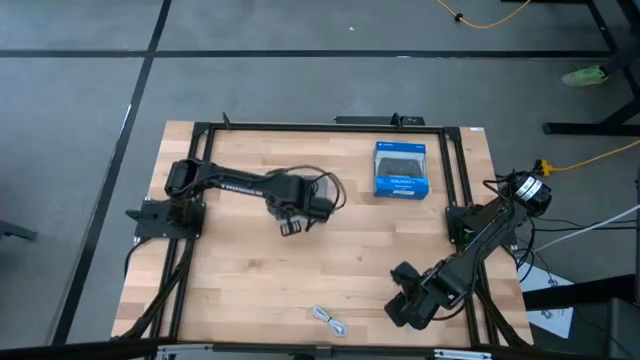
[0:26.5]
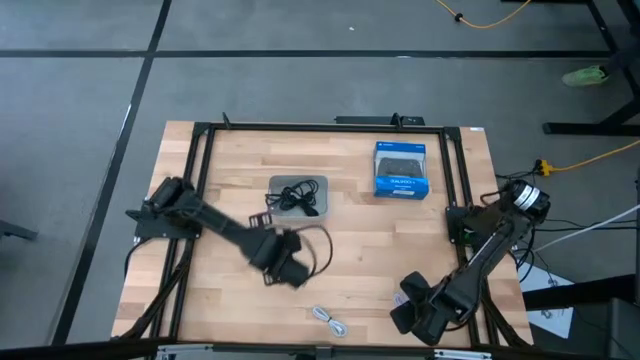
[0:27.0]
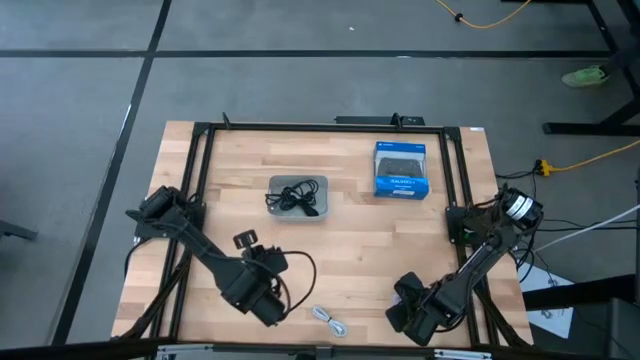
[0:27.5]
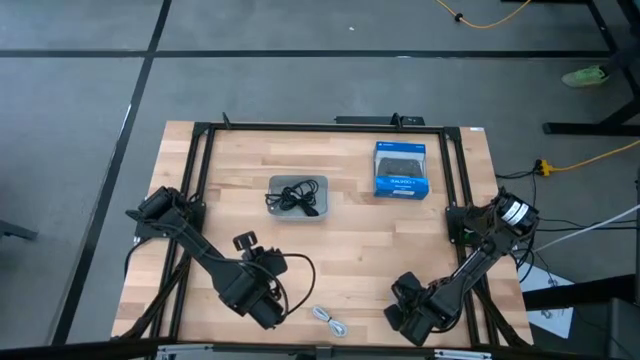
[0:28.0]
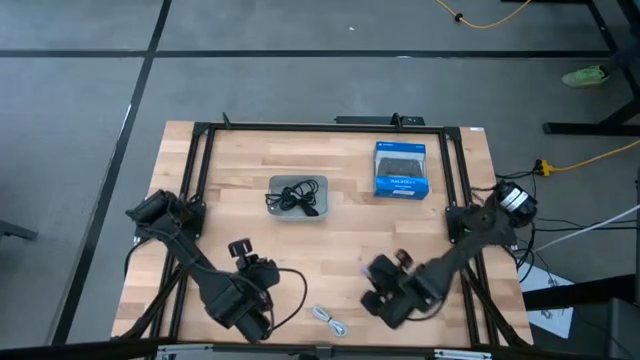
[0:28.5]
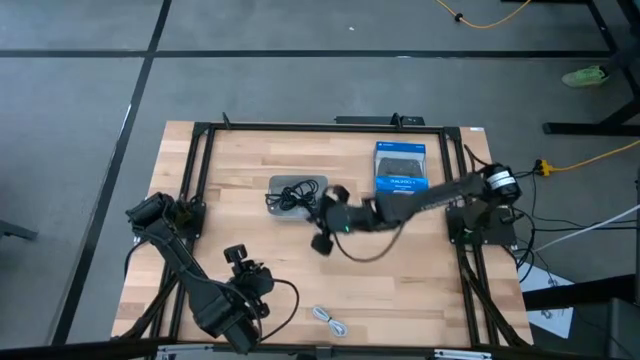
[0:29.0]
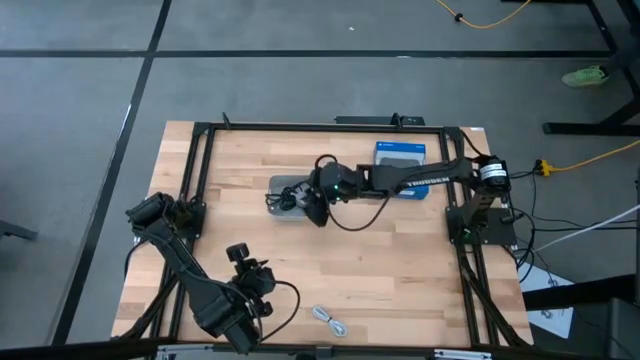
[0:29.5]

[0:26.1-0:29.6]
Task: Pick and place USB-C Cables
Put the purple charger cable into the gray container

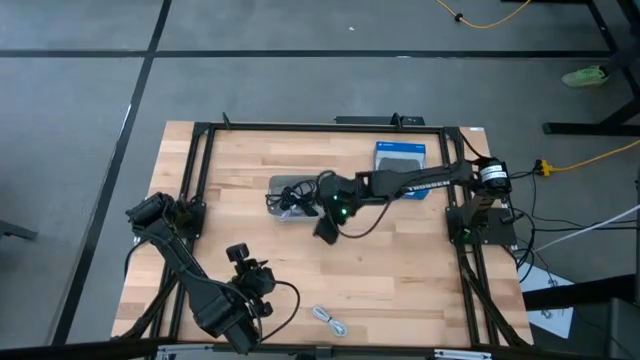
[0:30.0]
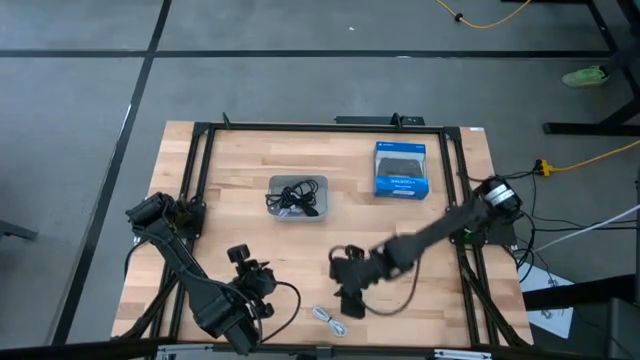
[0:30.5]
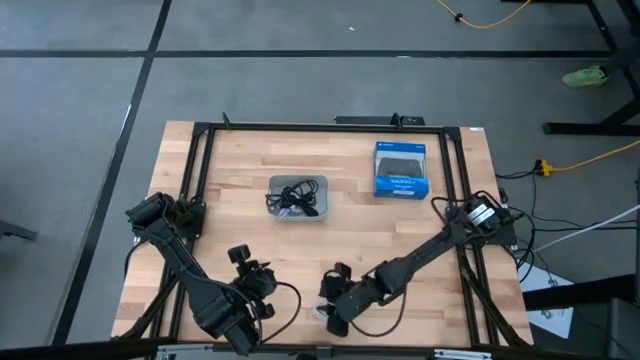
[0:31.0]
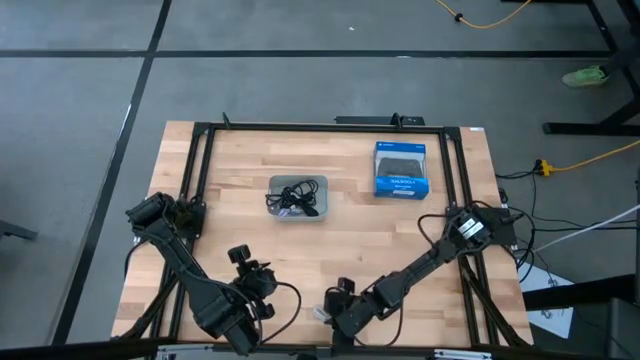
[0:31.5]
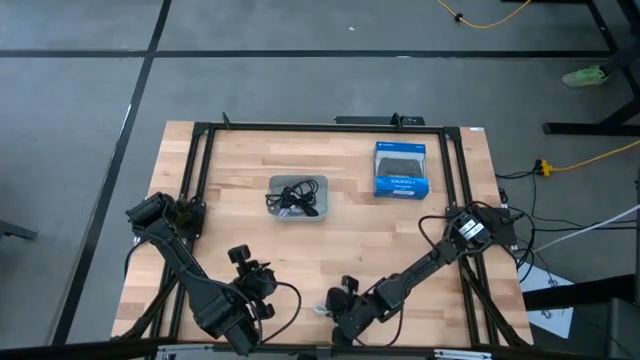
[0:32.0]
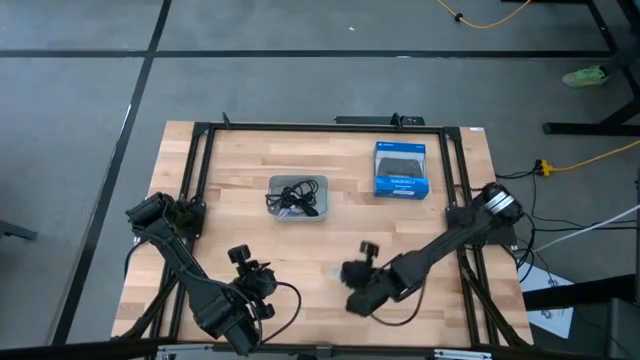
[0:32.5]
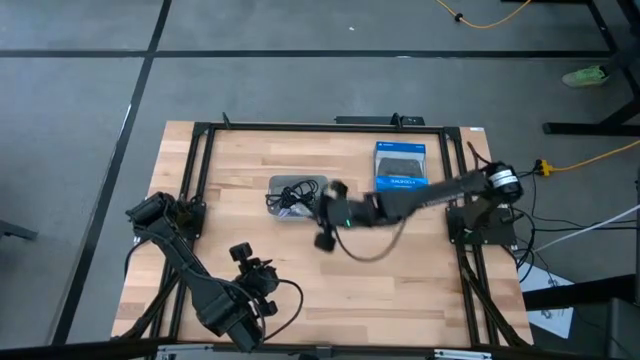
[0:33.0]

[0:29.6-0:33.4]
Put the white charger cable into the gray container

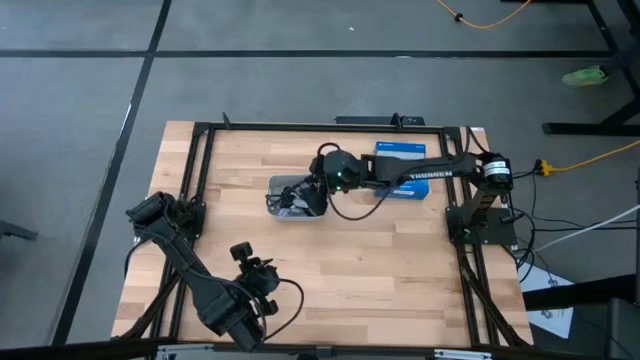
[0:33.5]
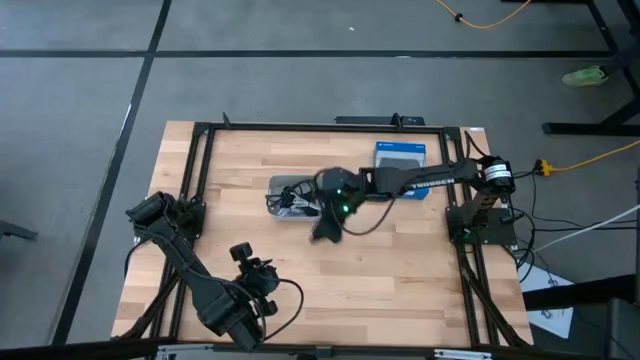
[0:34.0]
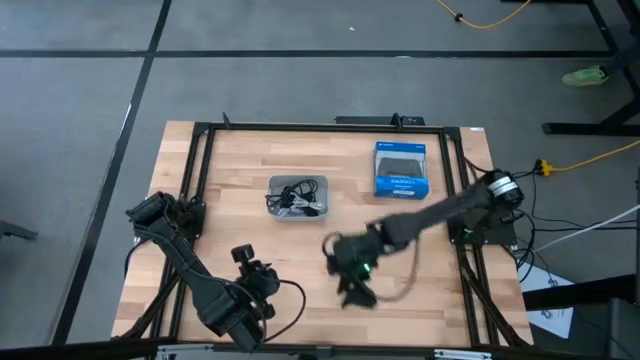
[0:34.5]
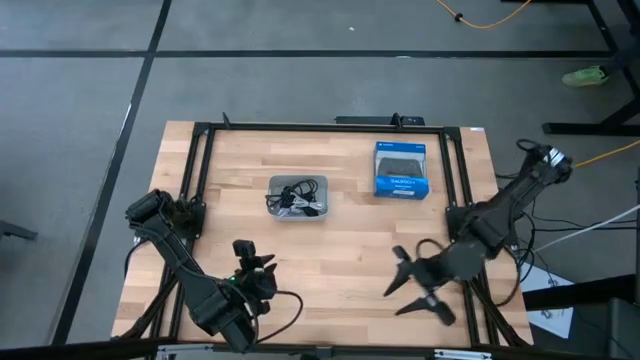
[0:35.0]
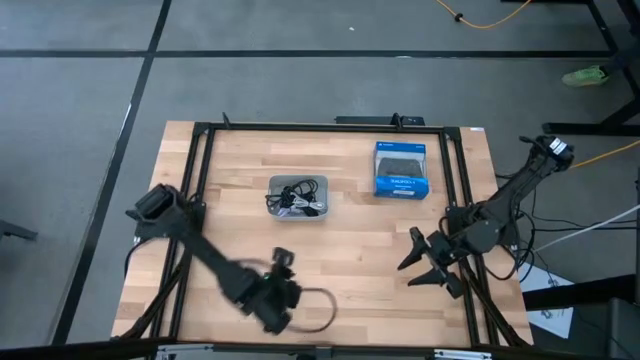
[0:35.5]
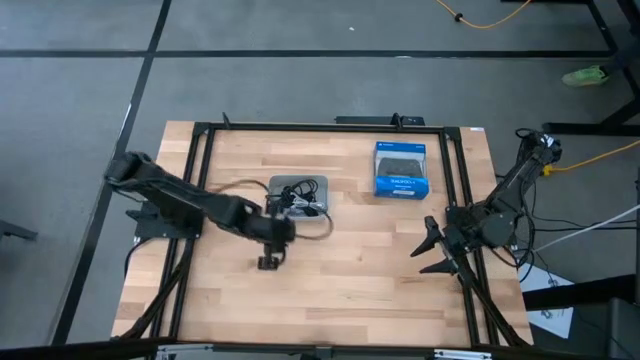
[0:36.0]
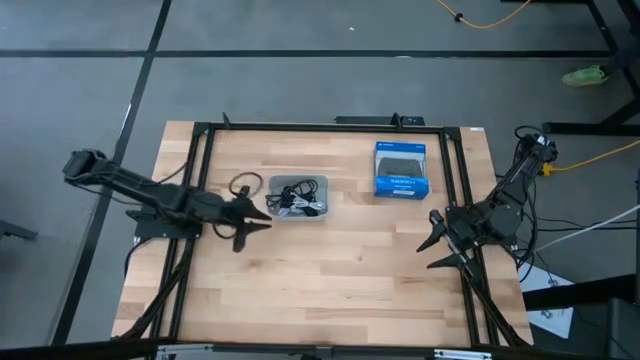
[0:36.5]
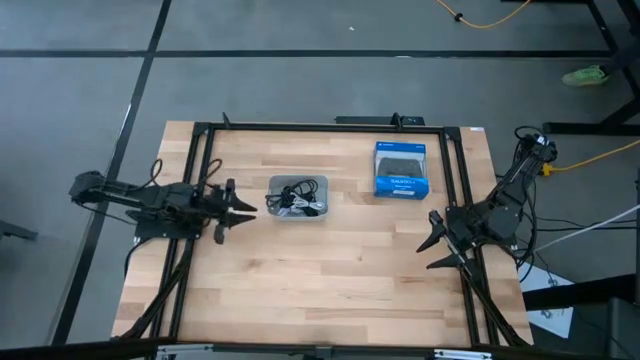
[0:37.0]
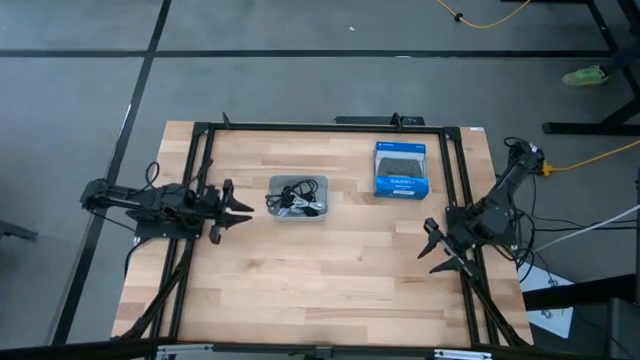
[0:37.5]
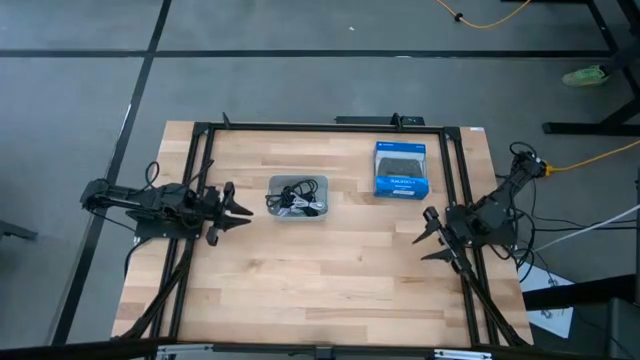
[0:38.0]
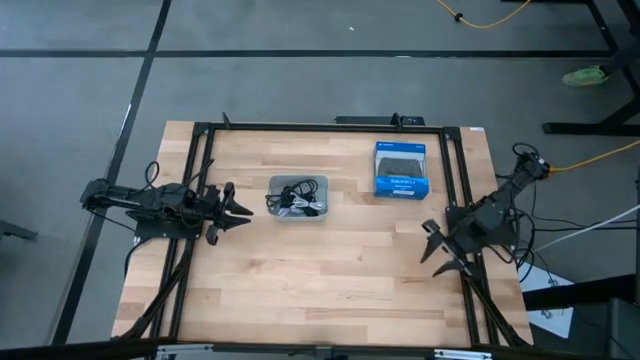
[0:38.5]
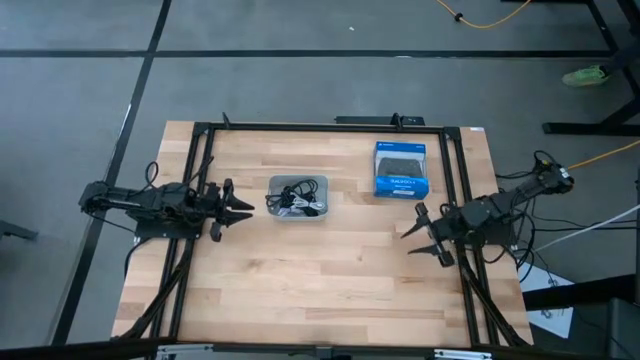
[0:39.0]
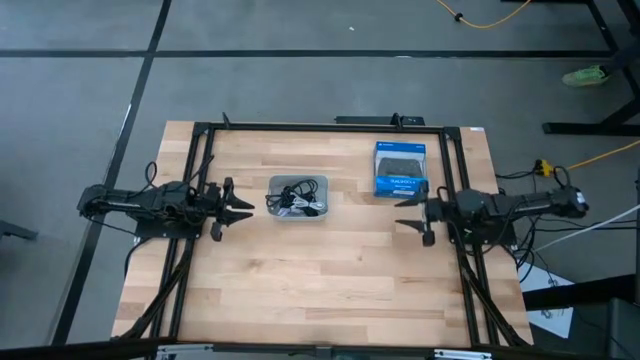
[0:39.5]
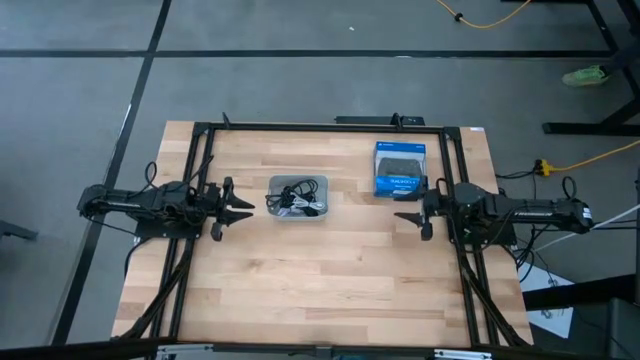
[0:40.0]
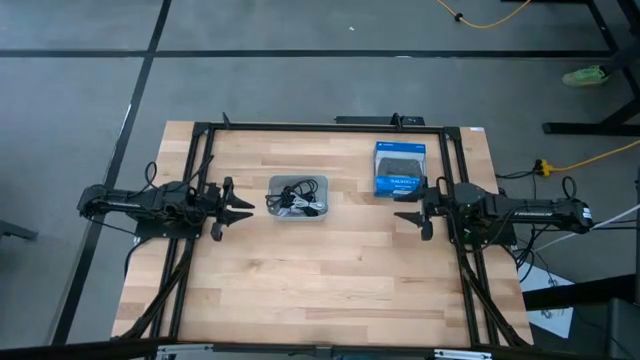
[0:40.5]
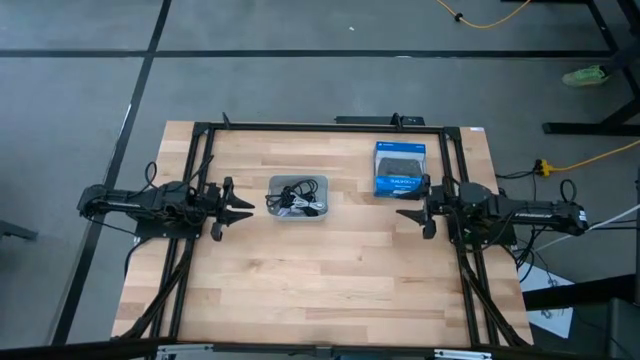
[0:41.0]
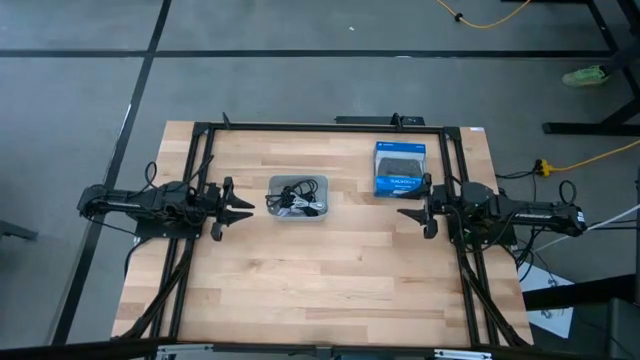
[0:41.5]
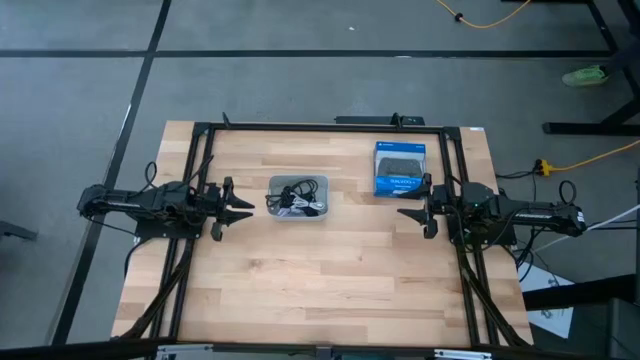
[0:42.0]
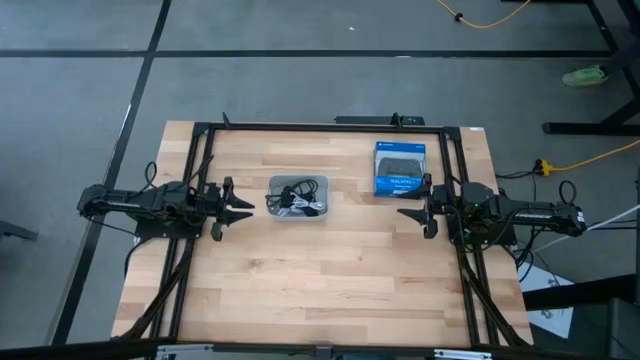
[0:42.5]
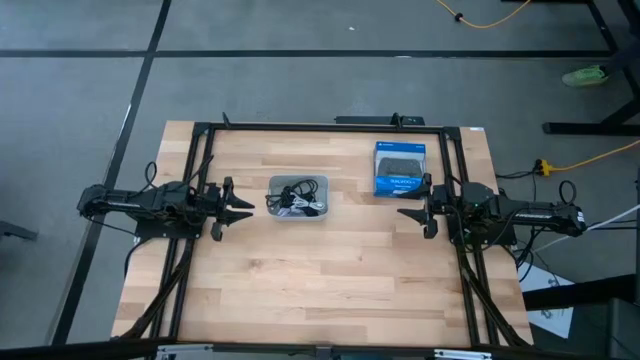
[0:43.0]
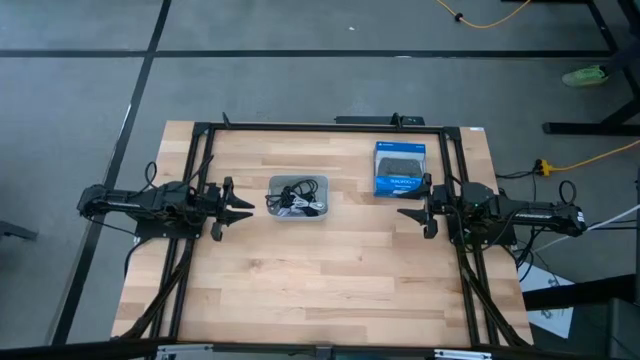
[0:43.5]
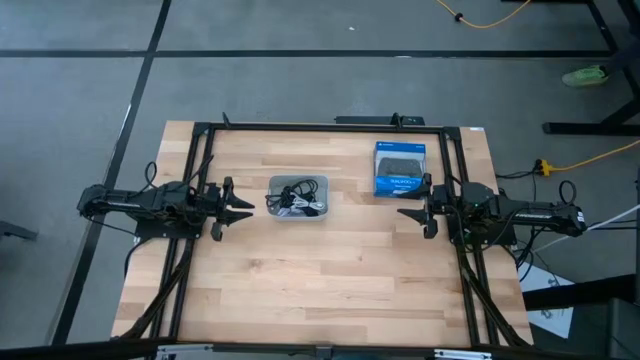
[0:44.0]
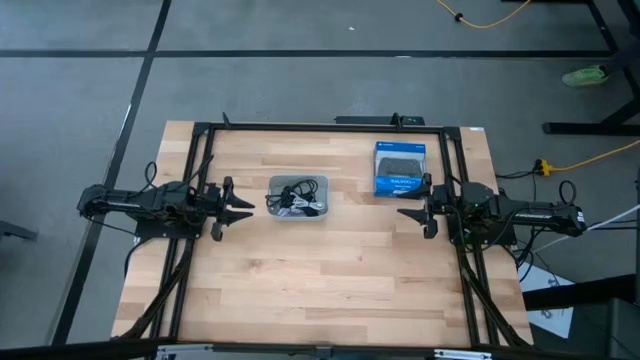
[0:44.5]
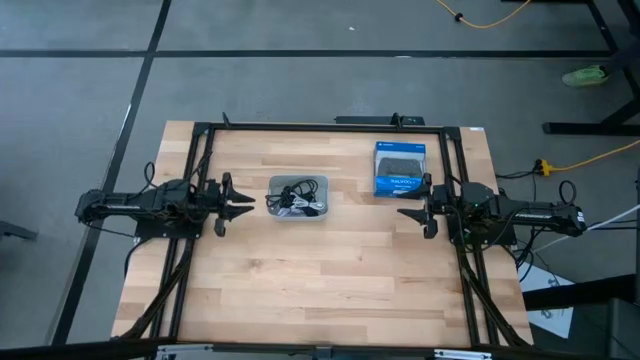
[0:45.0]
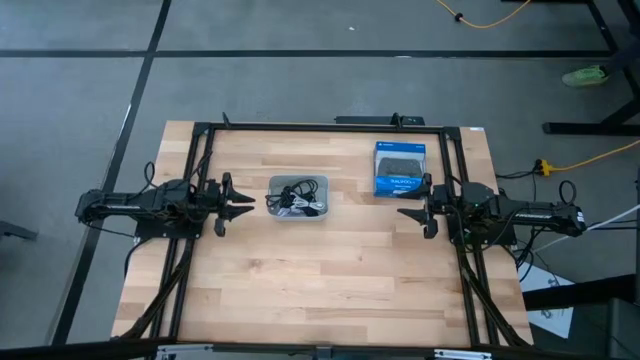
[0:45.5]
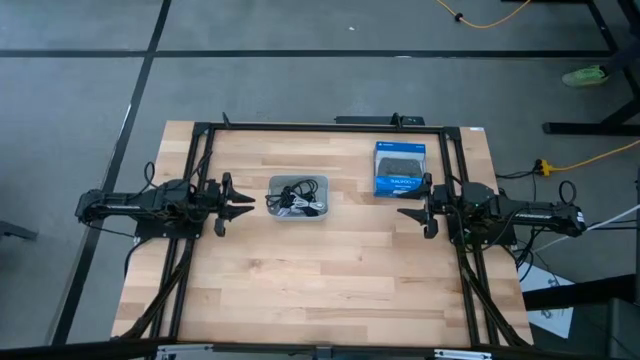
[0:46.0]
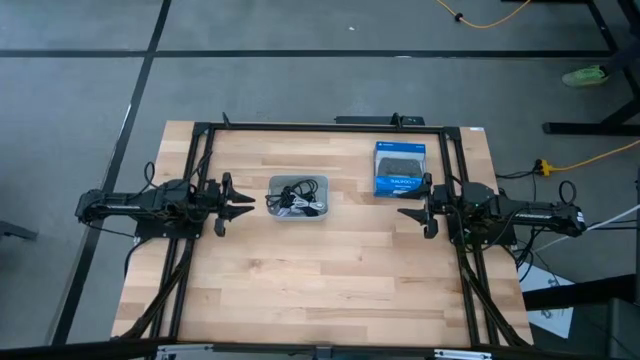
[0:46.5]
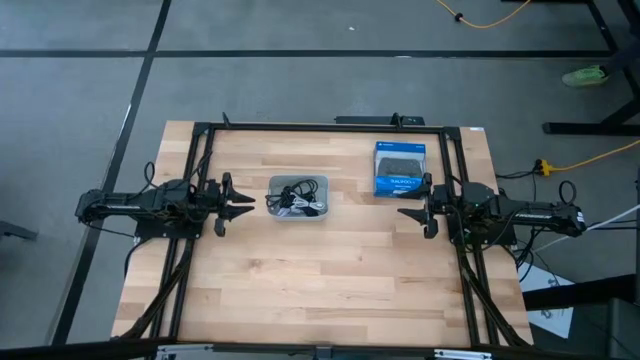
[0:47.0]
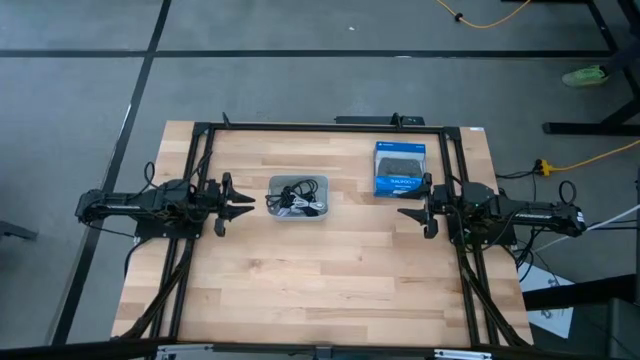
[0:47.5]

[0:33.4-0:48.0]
Return to Home Position
